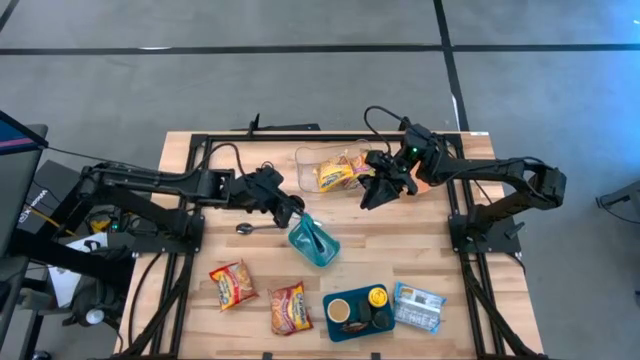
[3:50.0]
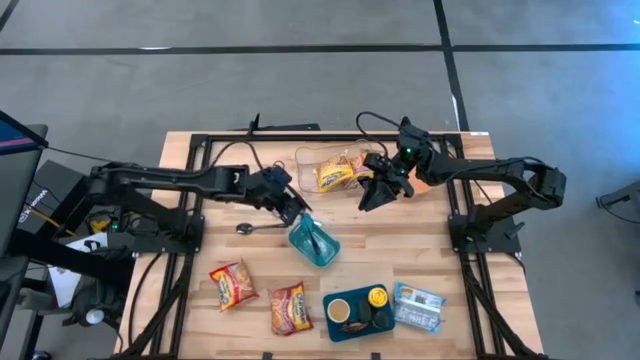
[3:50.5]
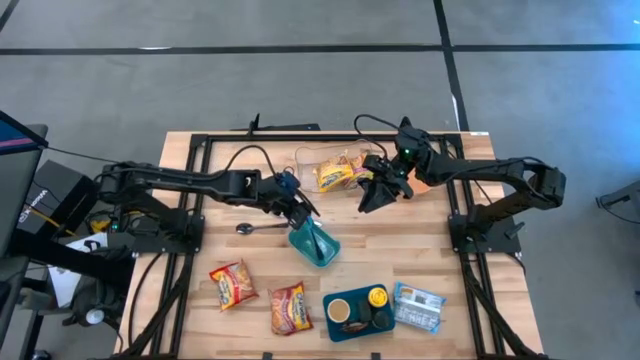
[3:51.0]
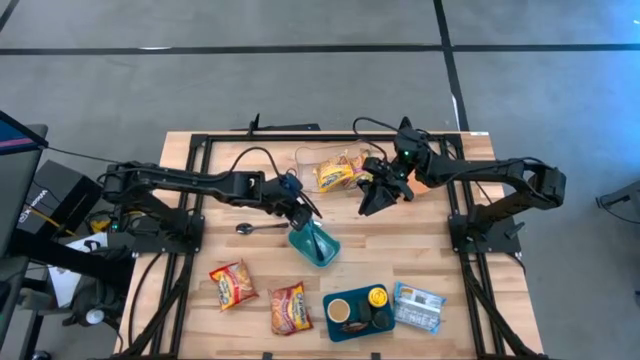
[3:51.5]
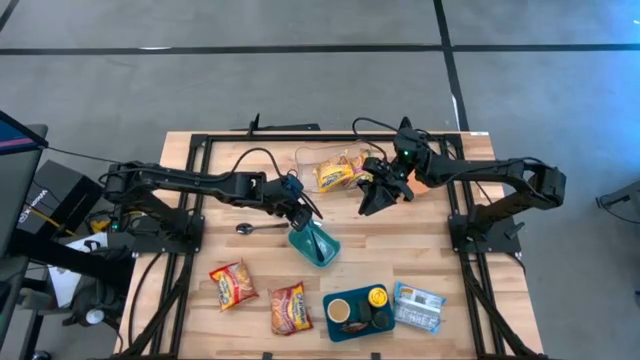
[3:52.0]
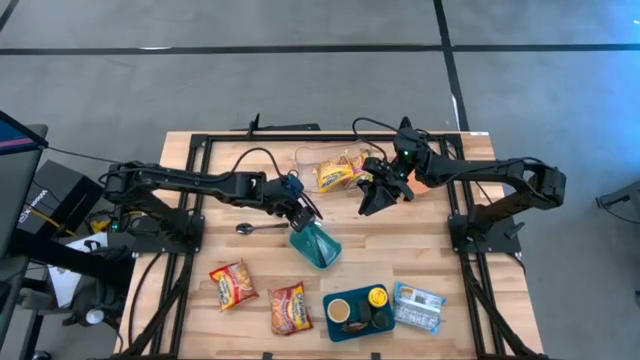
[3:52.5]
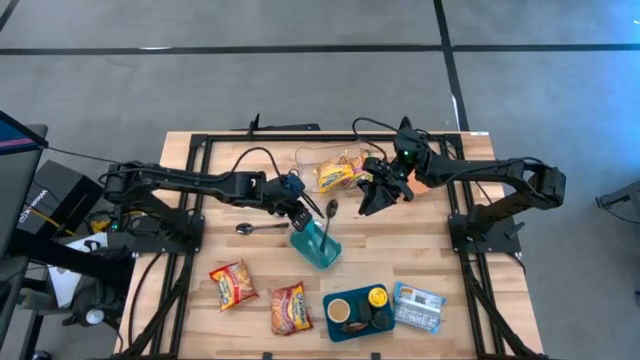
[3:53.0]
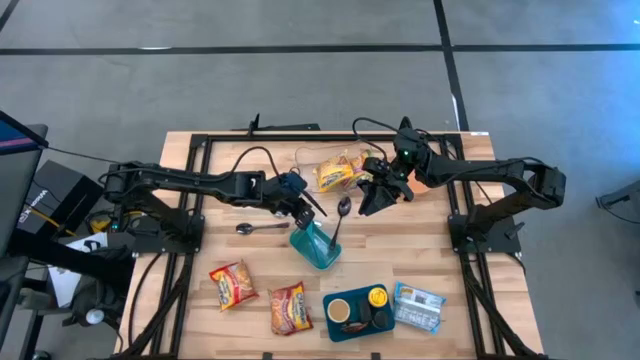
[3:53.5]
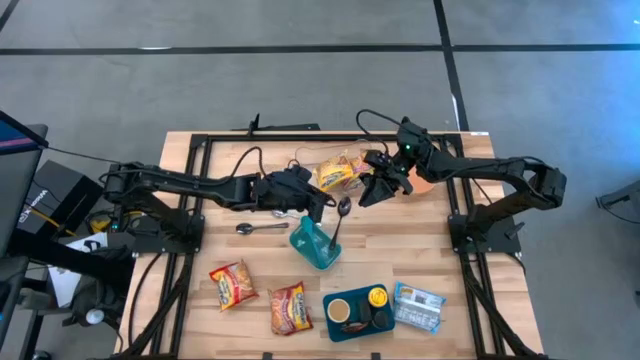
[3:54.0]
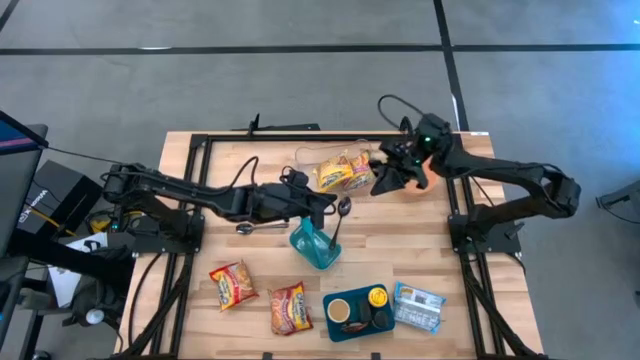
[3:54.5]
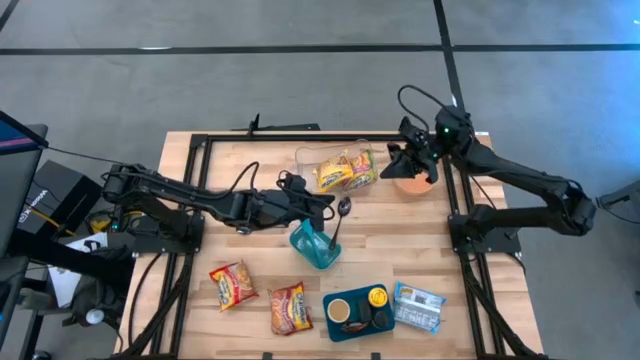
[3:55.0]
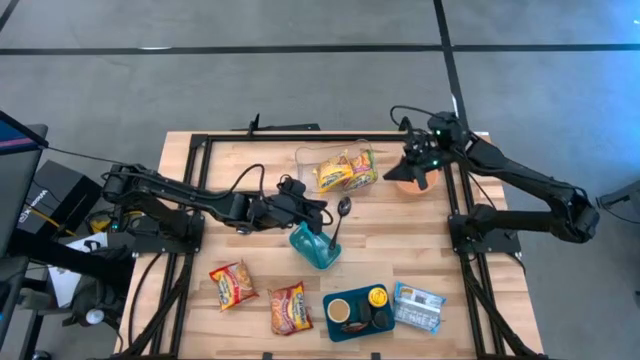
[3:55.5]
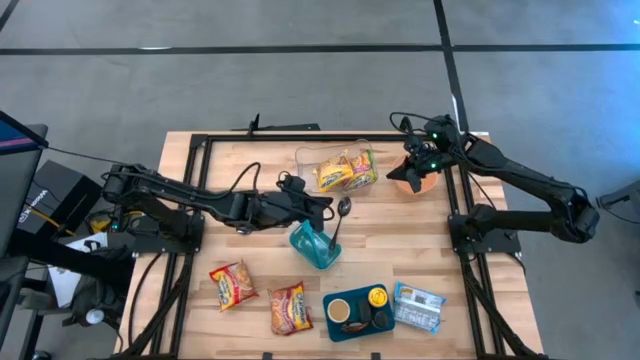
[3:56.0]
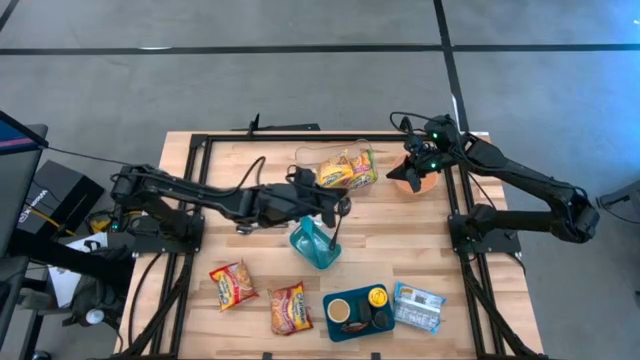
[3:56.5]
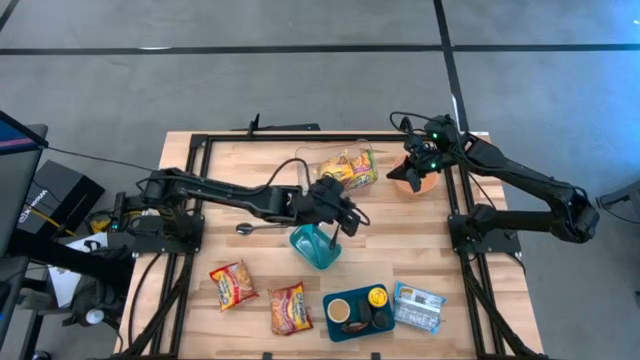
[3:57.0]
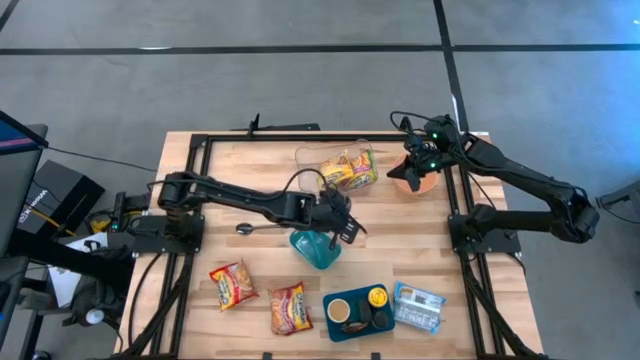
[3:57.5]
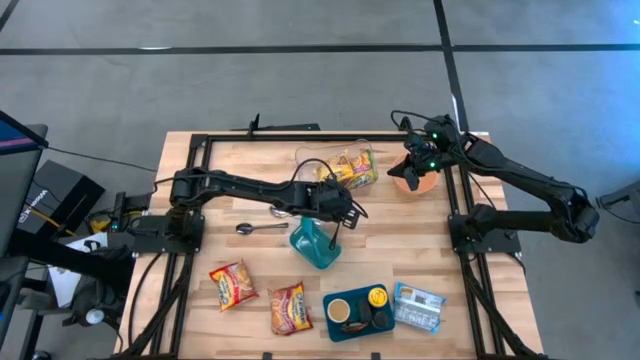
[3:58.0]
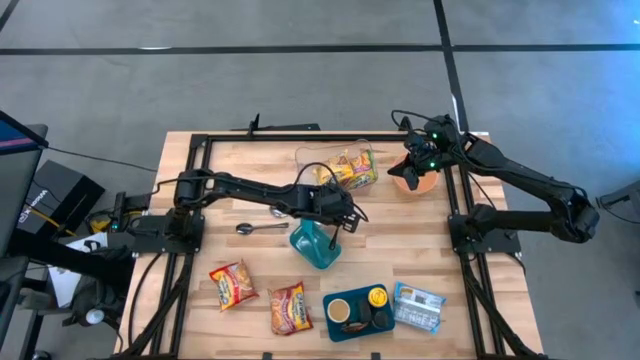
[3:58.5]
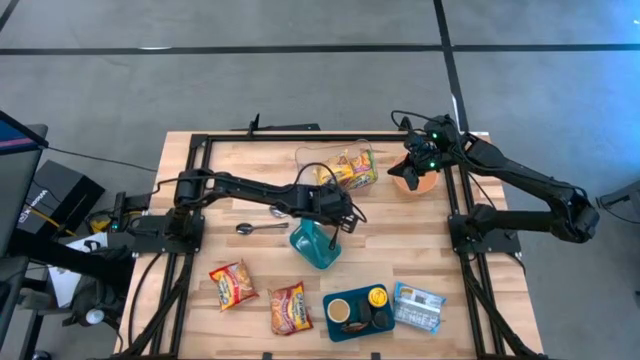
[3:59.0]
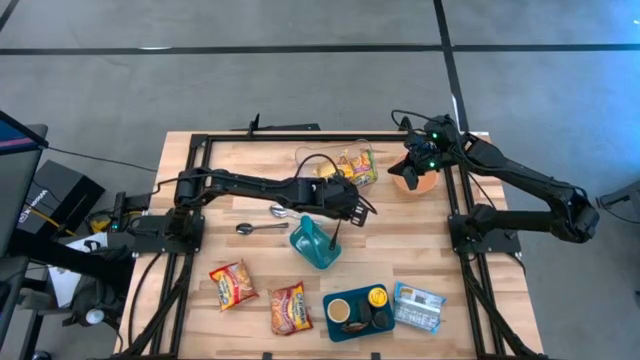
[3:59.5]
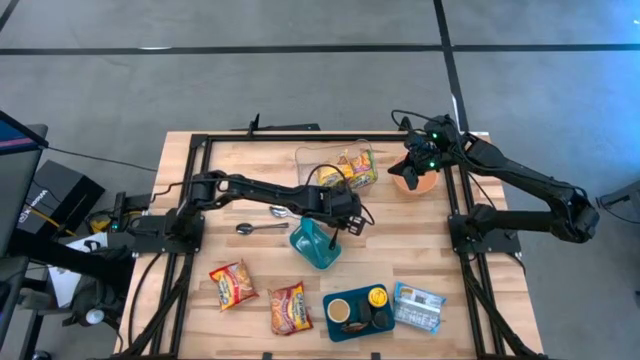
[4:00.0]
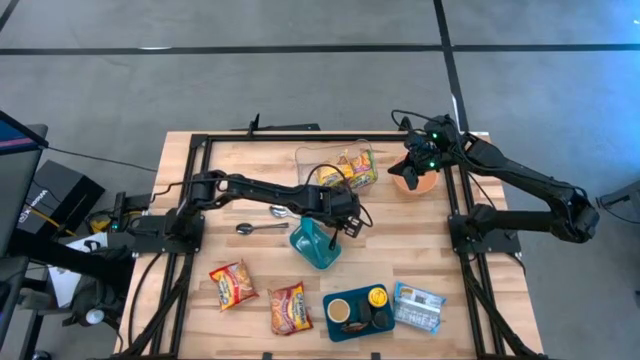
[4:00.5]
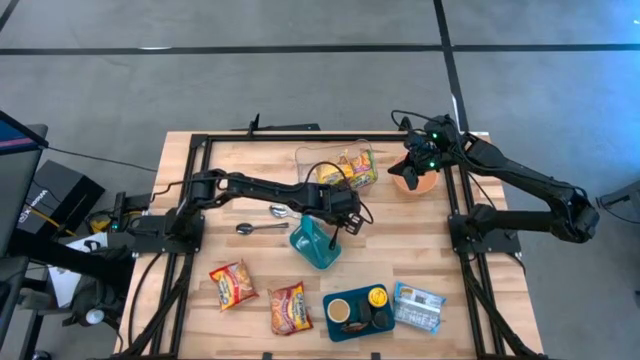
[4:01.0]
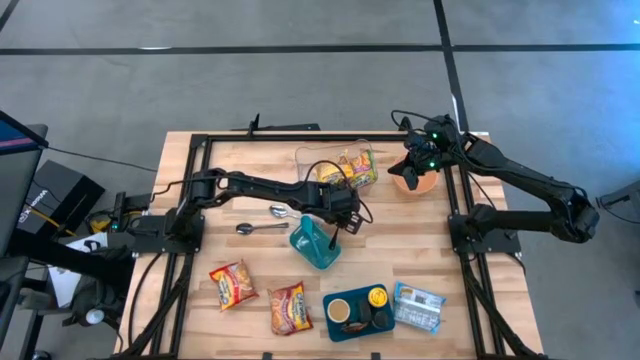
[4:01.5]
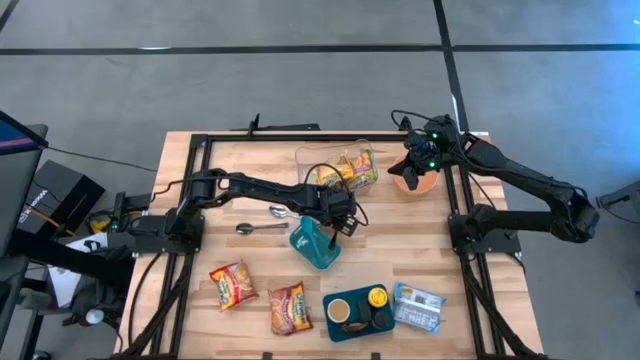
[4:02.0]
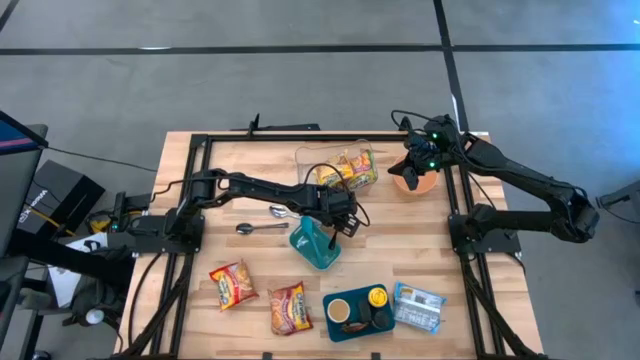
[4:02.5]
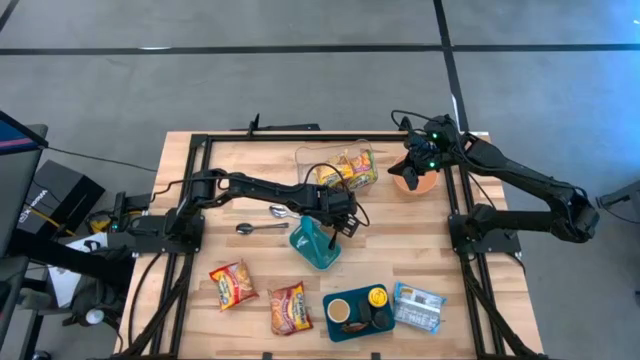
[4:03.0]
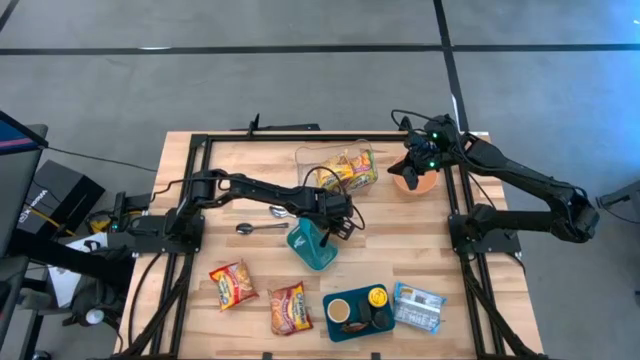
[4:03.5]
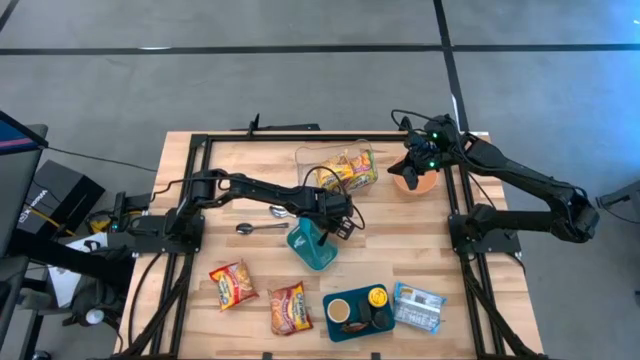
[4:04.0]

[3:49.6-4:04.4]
Task: Pick & Place Food Item
Put the right black spoon into the green bin

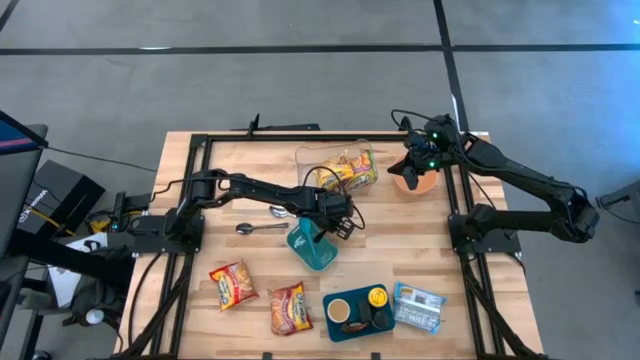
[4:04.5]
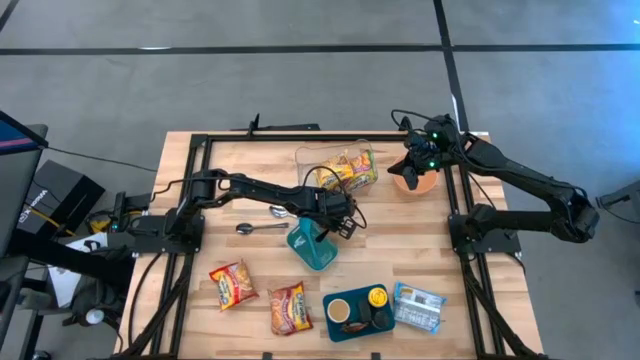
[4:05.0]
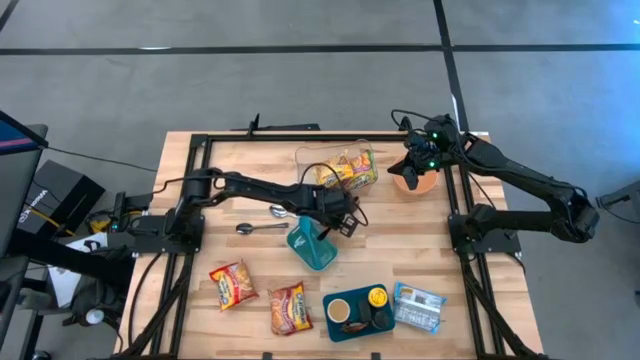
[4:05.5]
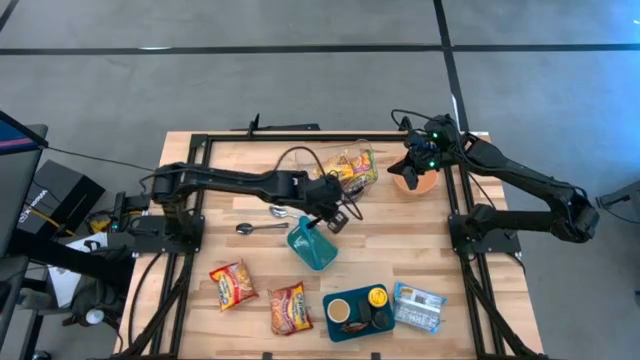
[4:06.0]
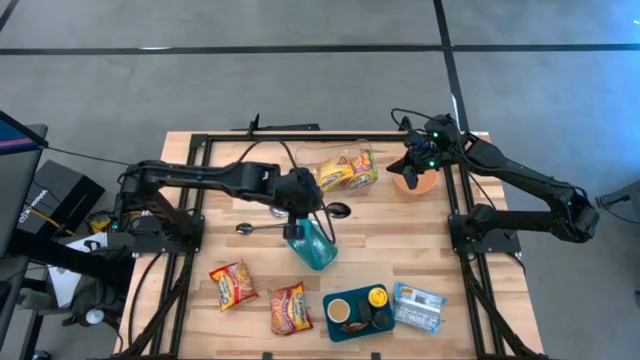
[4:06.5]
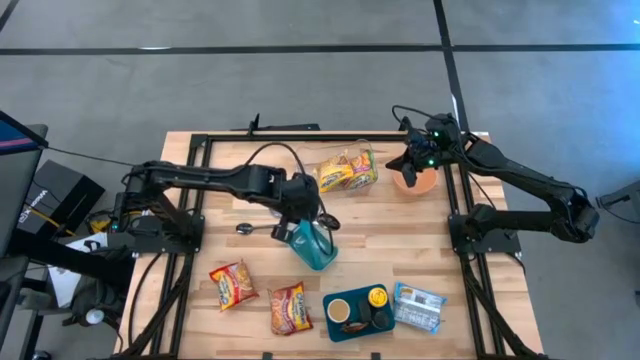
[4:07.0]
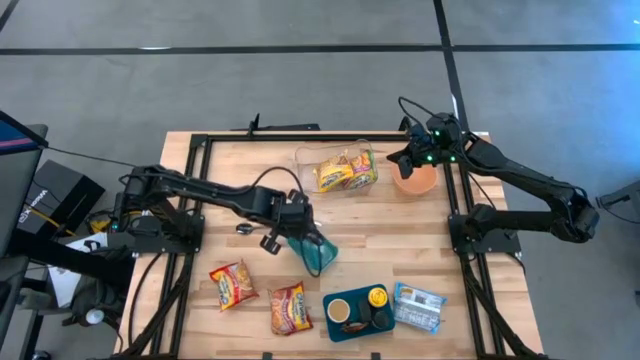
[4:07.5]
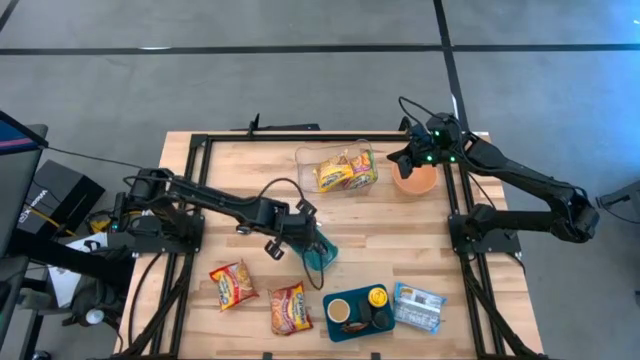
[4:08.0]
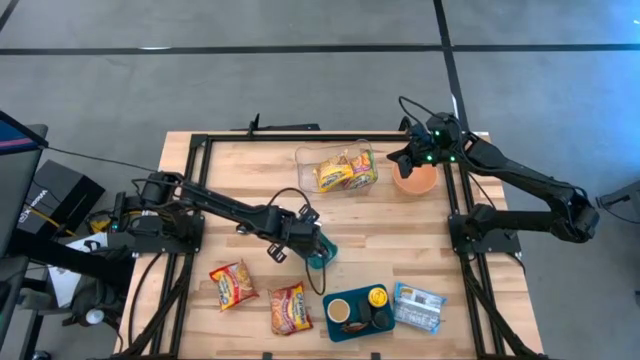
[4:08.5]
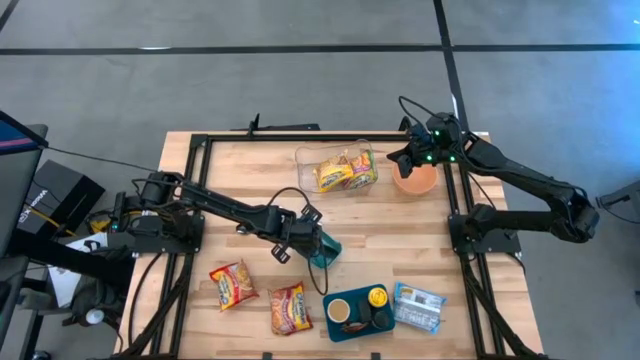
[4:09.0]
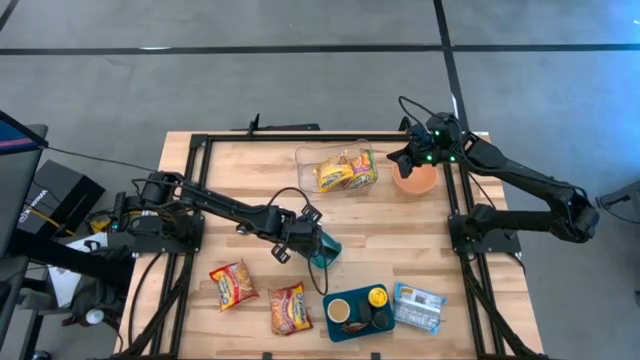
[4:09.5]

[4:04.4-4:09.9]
Put the right black spoon into the green bin
